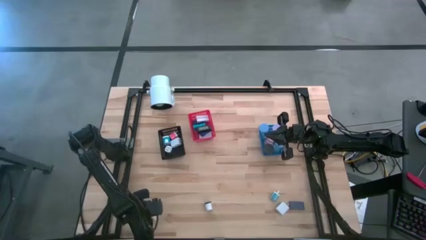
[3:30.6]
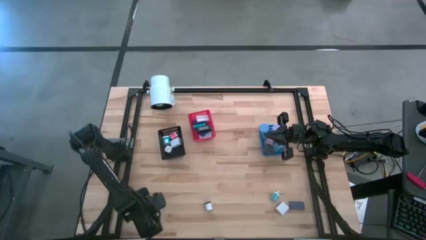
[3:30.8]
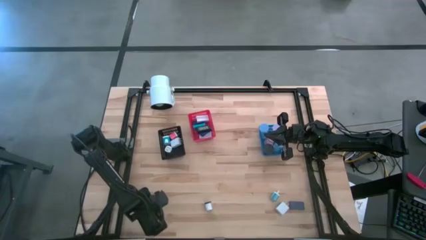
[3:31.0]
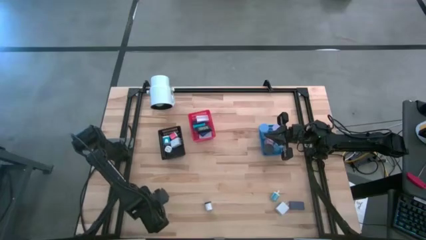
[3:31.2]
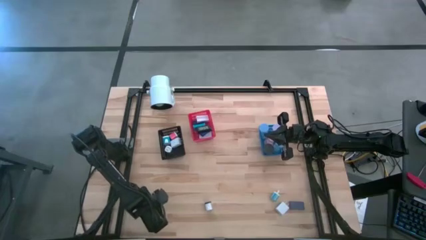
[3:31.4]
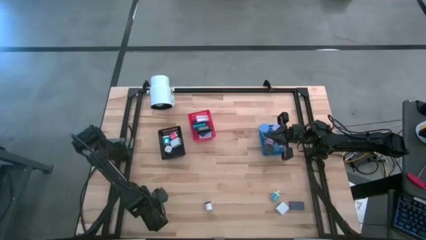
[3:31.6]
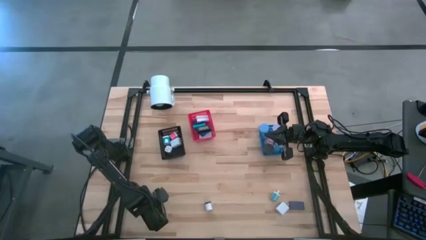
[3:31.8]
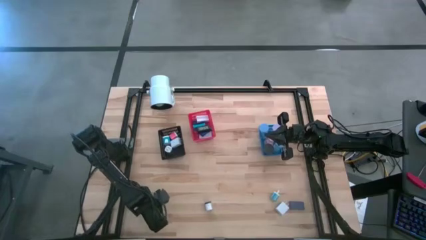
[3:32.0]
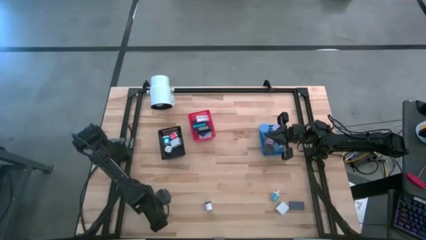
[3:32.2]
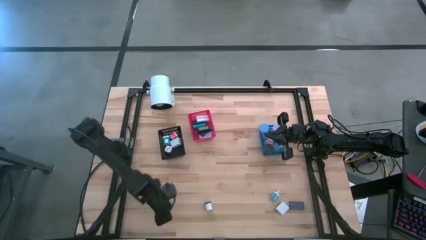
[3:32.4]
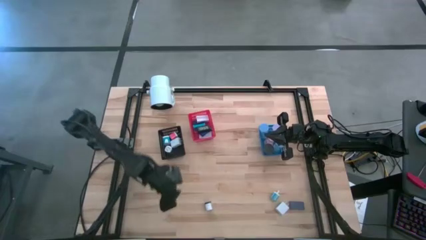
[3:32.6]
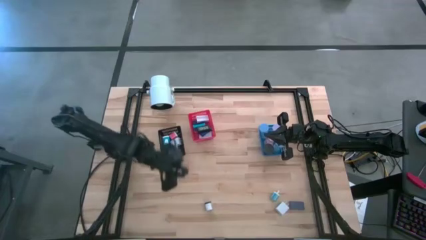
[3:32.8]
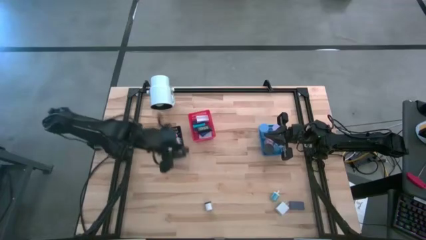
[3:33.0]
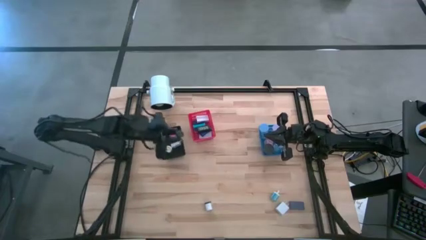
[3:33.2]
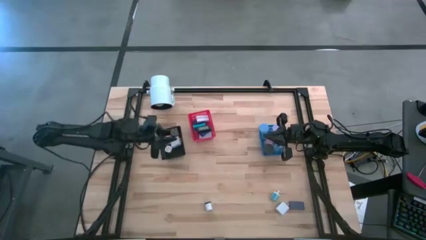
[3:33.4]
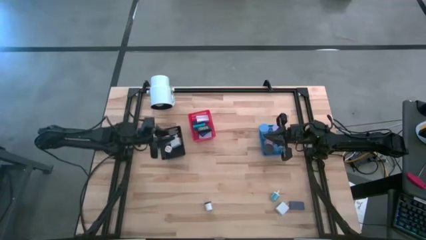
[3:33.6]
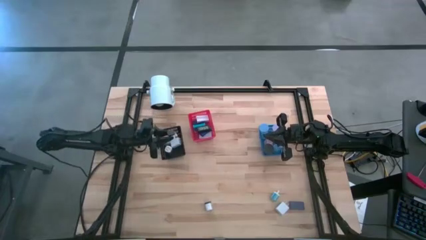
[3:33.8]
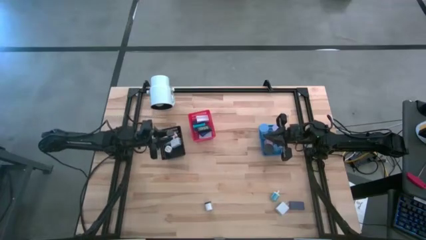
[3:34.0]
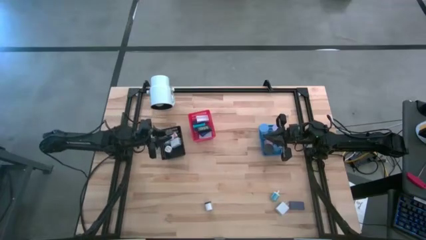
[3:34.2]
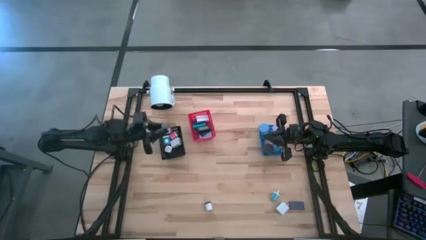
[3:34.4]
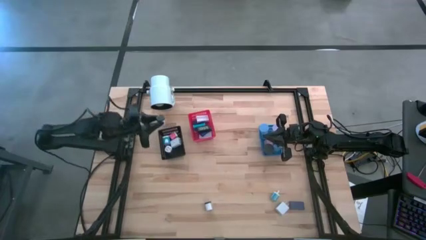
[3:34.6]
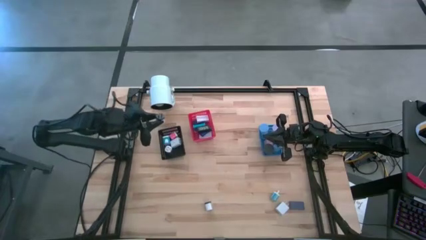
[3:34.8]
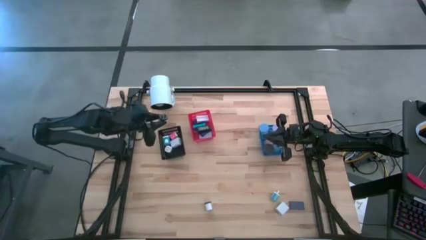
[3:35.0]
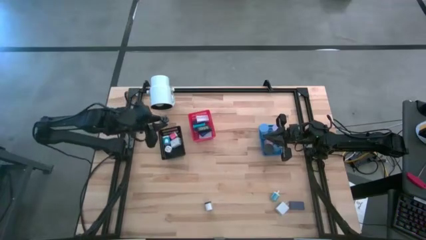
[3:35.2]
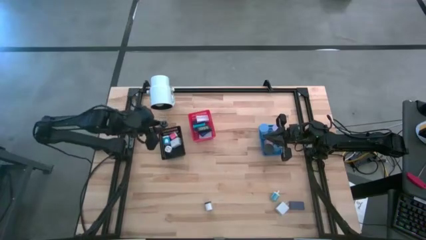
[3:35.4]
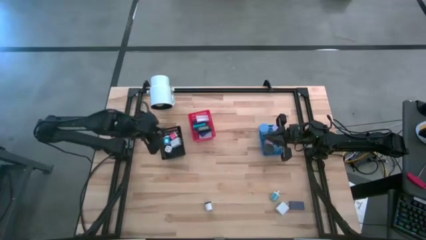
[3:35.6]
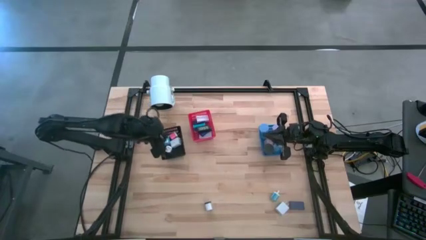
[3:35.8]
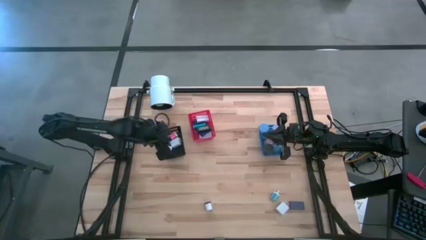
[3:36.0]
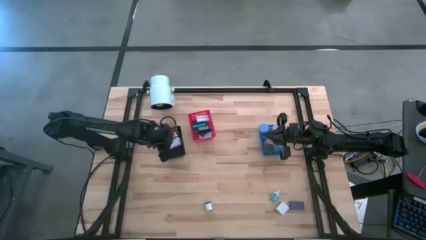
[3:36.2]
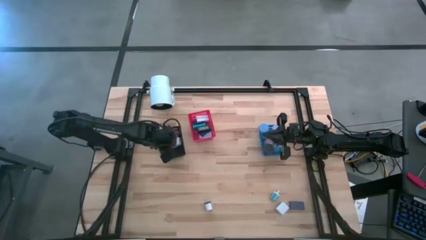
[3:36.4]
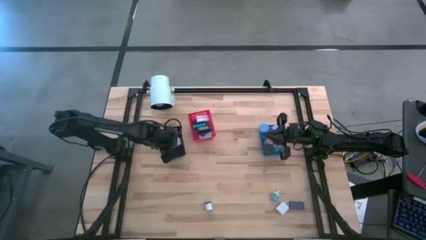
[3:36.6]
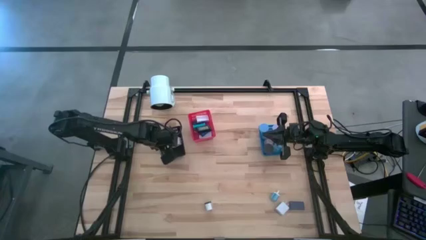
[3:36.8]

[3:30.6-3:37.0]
Task: Pick & Place Office items
Put the left white black charger adapter into the black bin

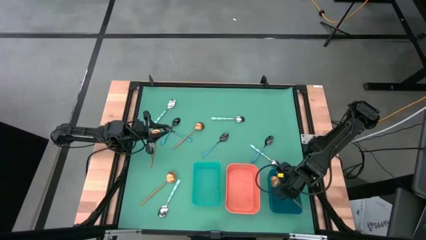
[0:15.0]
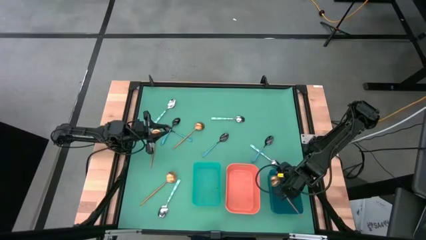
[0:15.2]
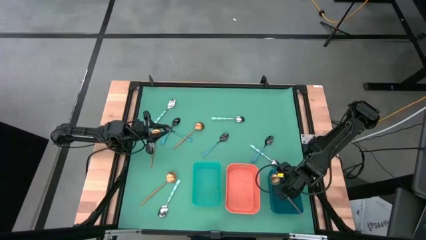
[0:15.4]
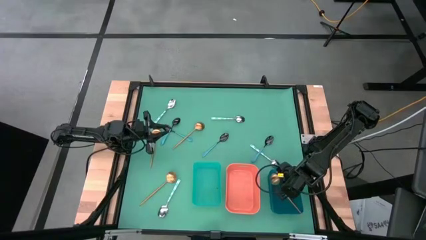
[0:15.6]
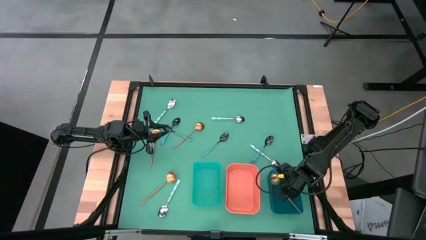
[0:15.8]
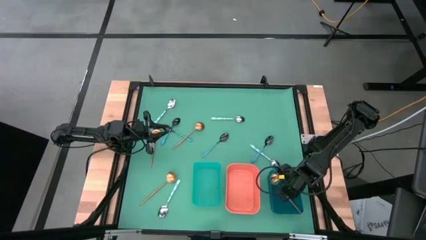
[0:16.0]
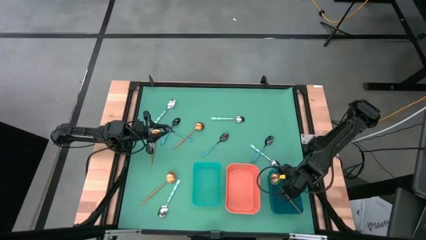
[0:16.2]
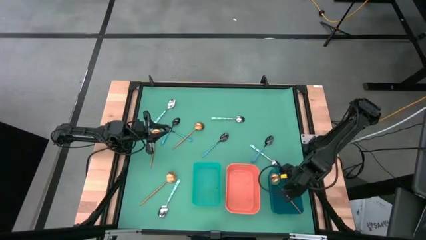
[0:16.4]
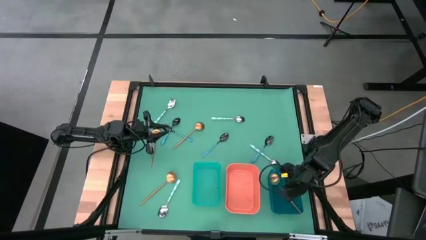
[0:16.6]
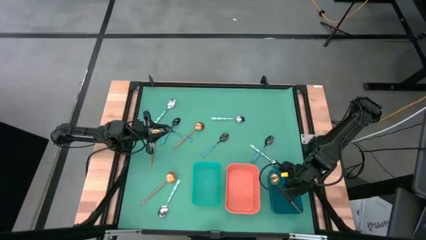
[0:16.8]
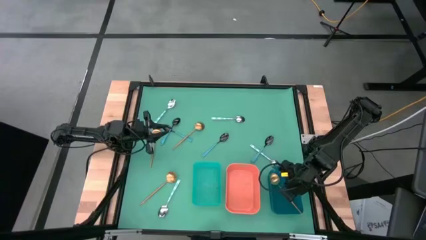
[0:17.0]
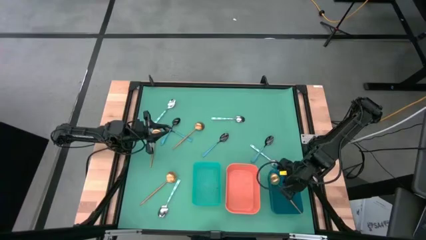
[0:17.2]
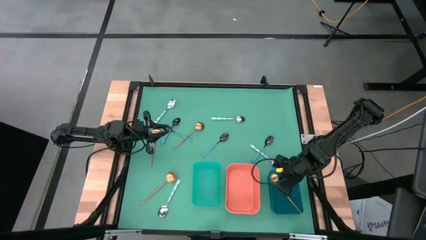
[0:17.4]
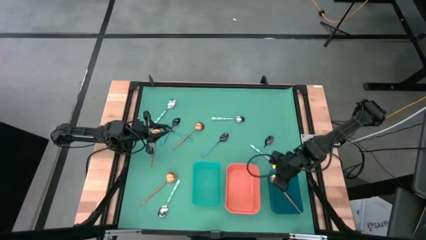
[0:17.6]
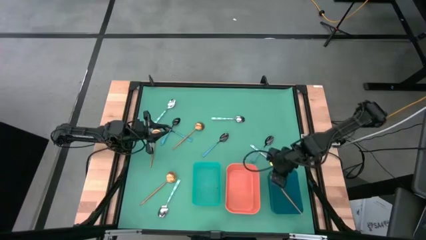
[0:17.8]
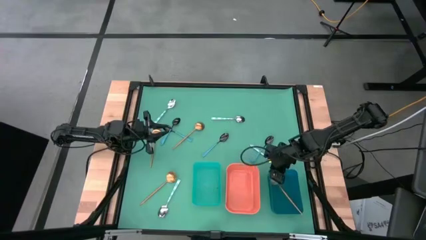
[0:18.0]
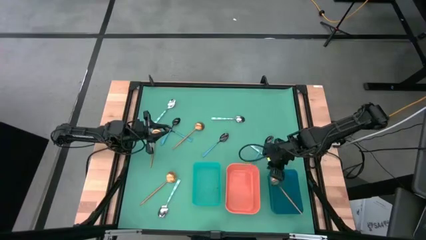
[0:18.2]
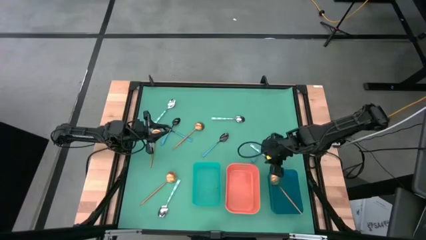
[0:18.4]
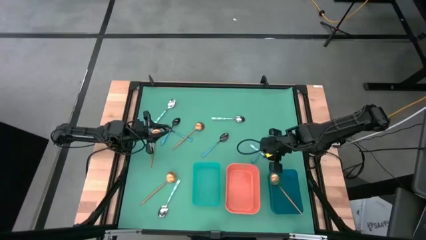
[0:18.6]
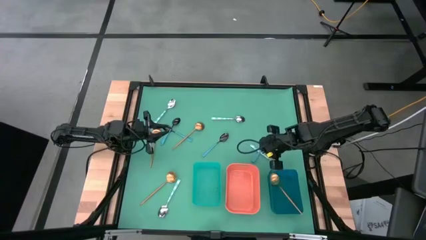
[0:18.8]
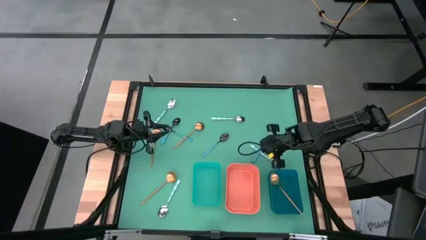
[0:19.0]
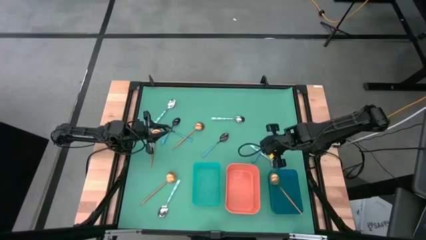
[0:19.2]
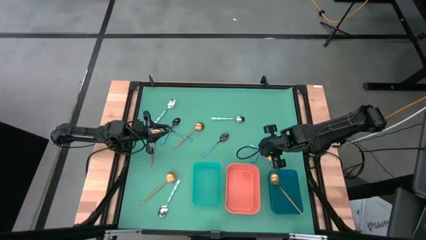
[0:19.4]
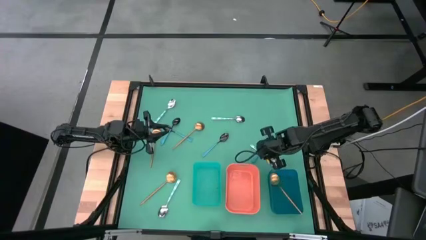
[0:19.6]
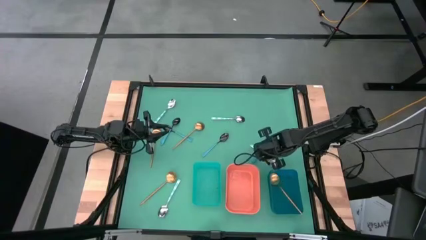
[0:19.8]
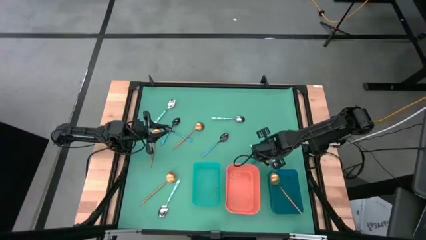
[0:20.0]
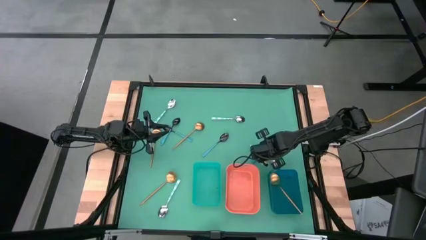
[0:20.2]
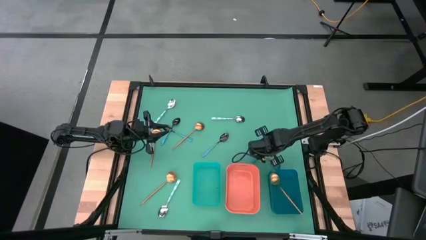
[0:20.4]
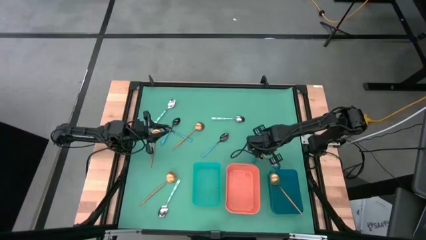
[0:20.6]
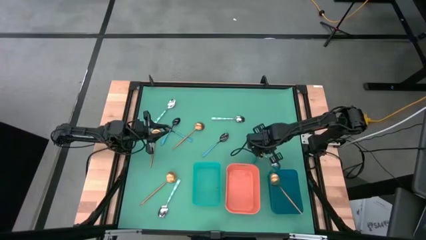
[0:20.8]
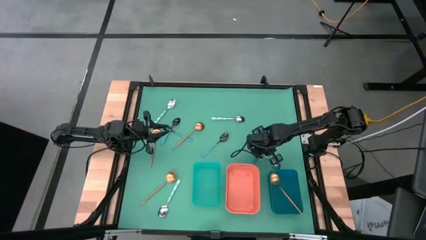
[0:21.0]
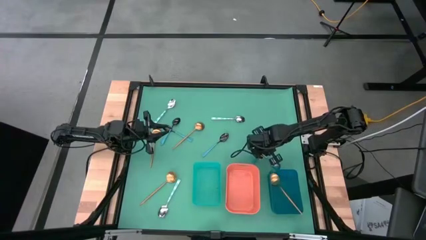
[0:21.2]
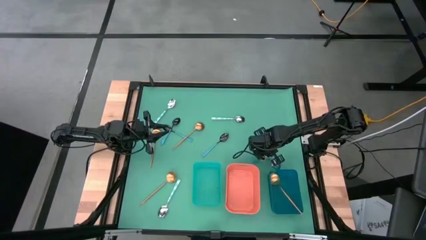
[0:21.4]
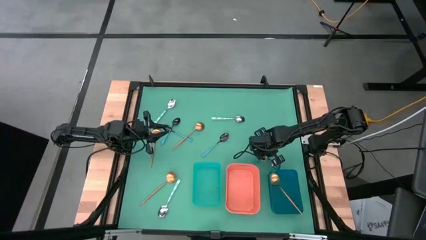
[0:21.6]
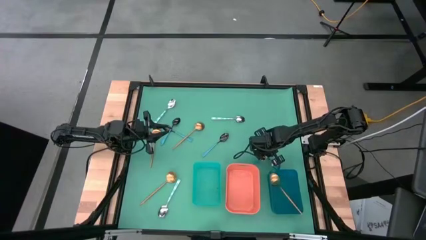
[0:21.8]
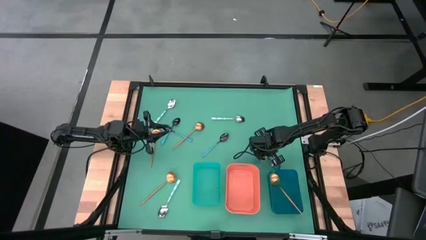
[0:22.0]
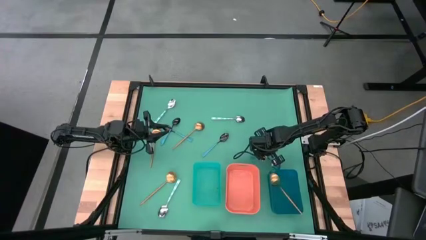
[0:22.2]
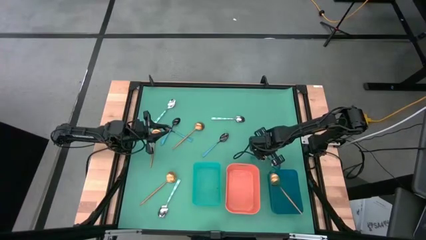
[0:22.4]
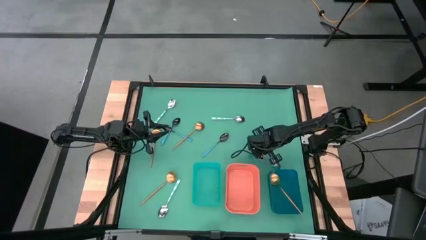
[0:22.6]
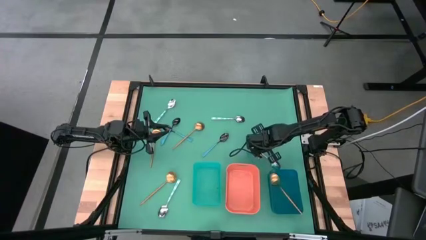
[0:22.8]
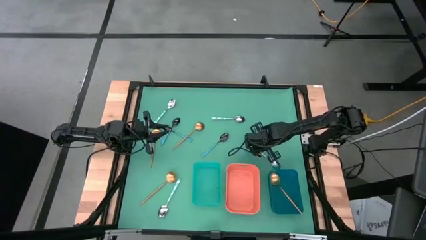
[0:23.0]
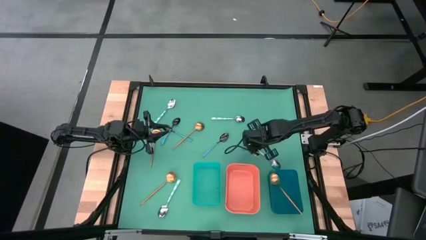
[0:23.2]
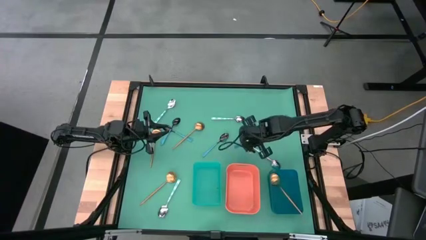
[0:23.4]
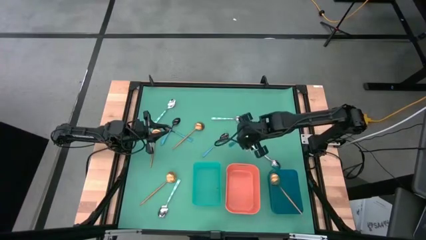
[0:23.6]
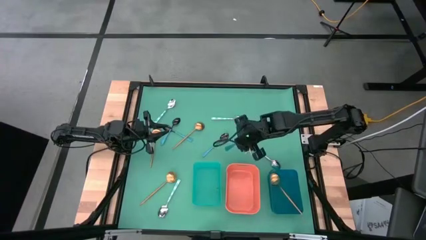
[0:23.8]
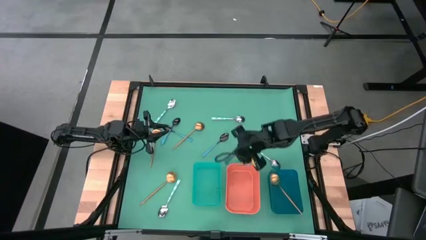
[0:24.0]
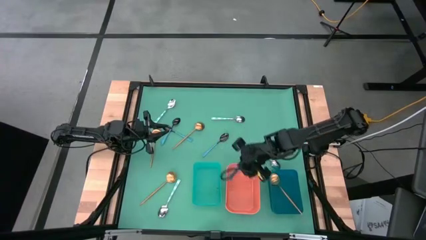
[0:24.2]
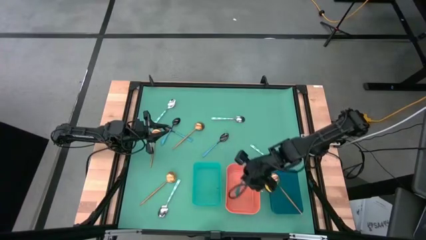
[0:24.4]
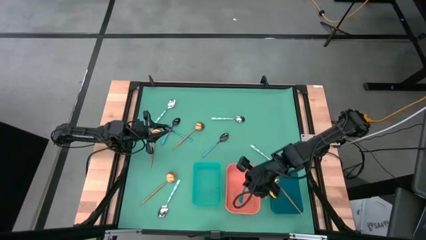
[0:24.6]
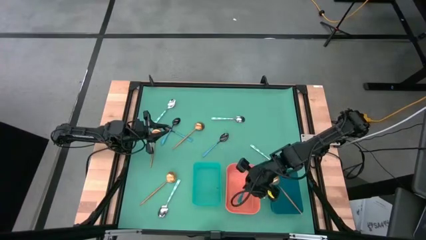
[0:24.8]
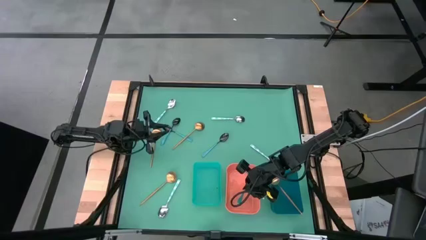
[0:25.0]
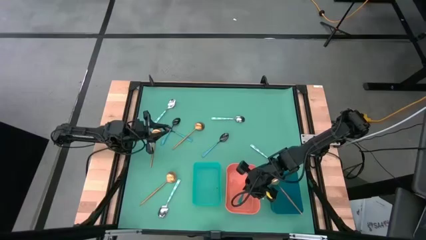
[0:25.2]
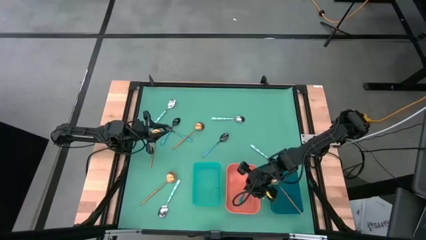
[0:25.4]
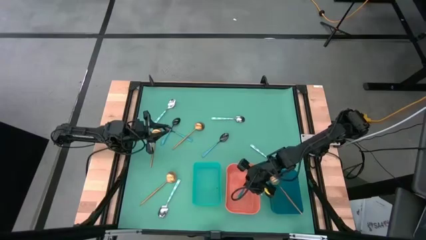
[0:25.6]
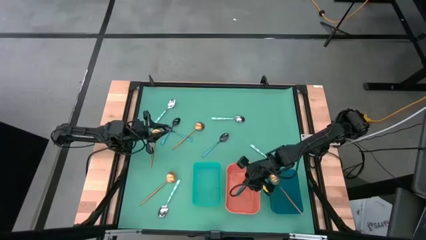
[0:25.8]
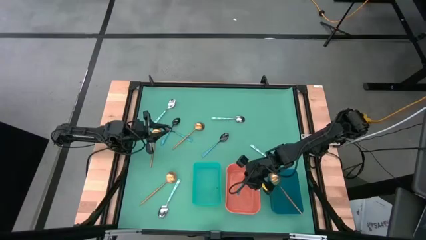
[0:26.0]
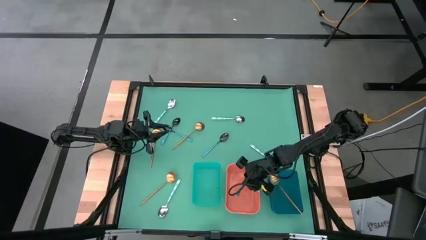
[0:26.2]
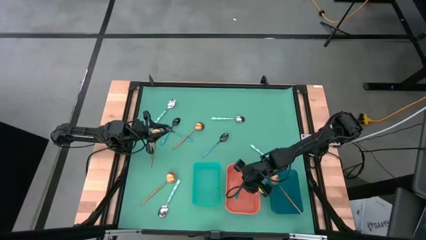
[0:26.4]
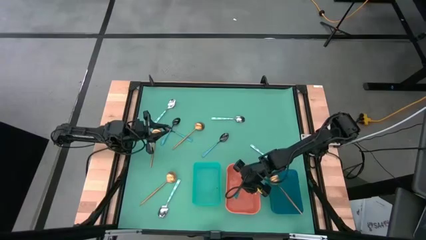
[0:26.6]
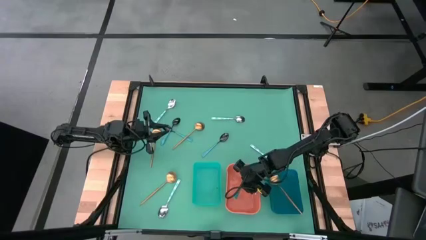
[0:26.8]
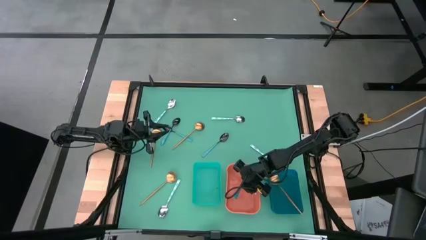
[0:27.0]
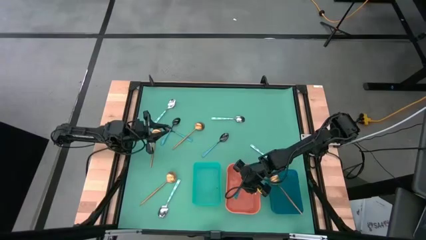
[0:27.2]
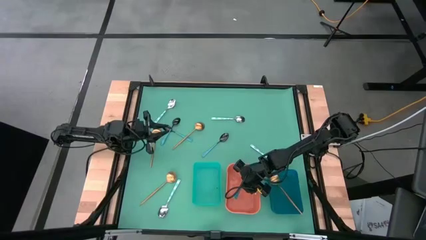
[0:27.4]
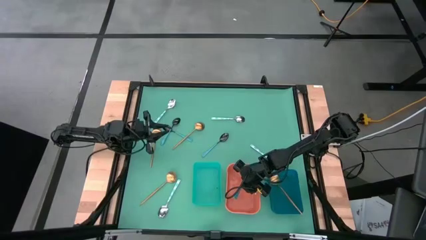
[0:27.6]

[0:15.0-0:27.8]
Task: Sort silverware by color (type)
Put the blue spoon into the orange bin
